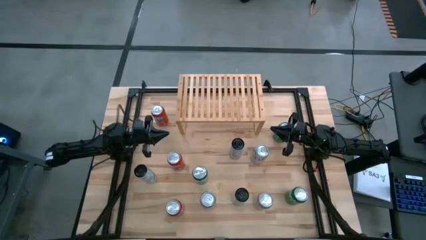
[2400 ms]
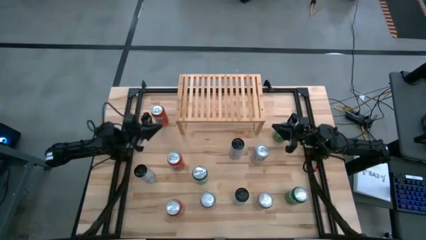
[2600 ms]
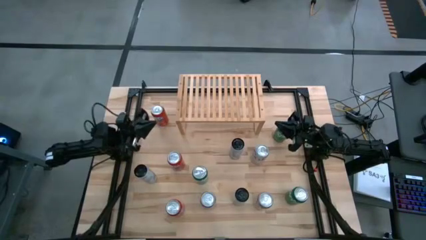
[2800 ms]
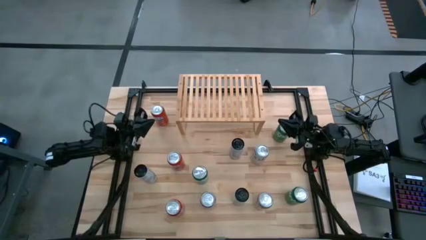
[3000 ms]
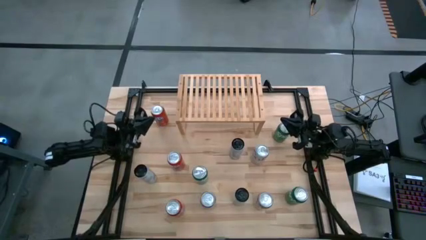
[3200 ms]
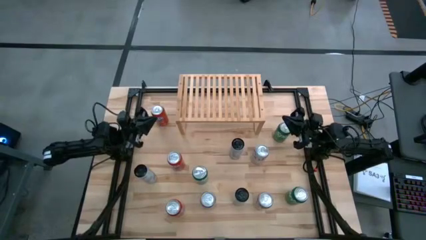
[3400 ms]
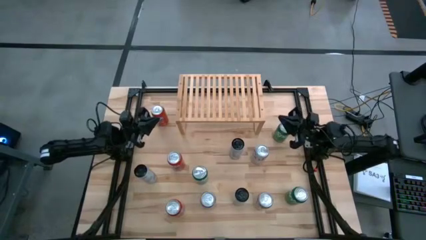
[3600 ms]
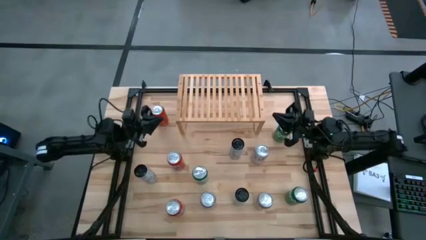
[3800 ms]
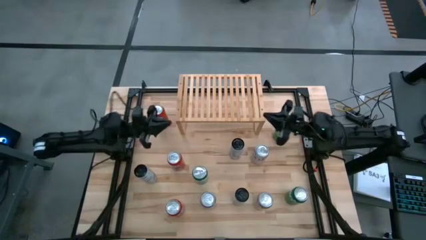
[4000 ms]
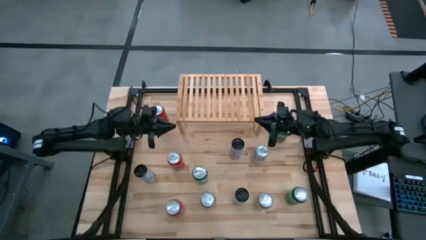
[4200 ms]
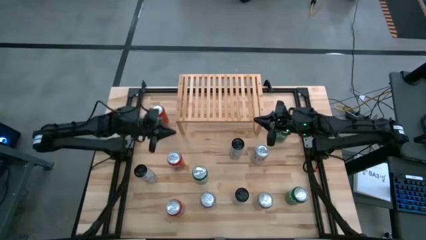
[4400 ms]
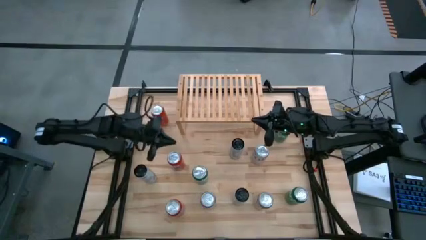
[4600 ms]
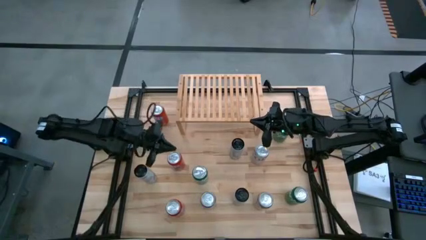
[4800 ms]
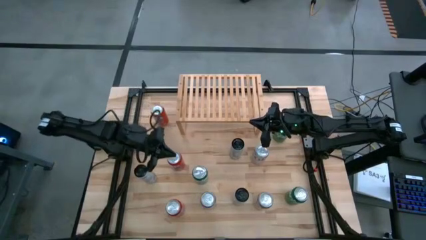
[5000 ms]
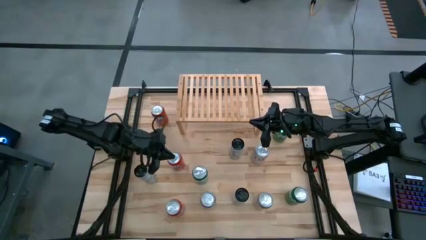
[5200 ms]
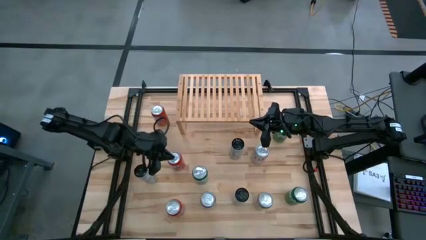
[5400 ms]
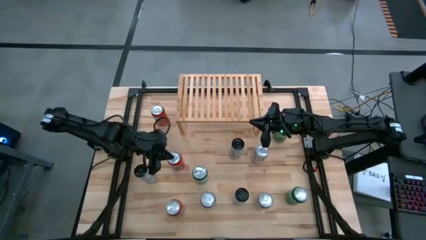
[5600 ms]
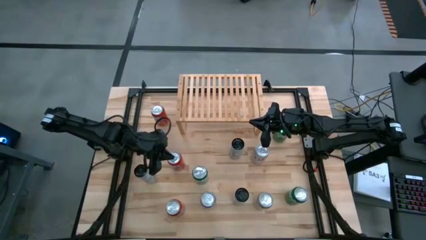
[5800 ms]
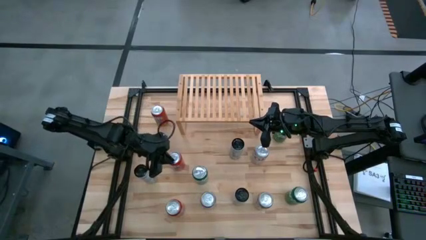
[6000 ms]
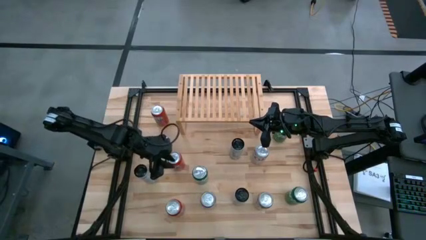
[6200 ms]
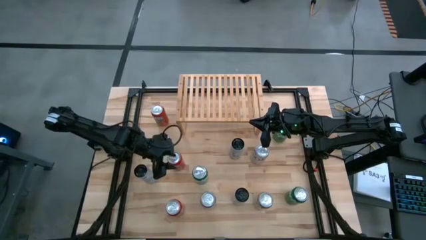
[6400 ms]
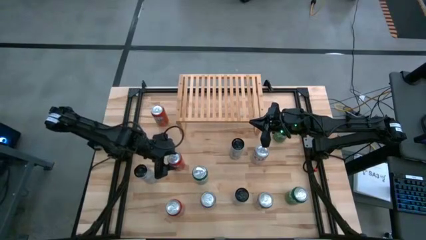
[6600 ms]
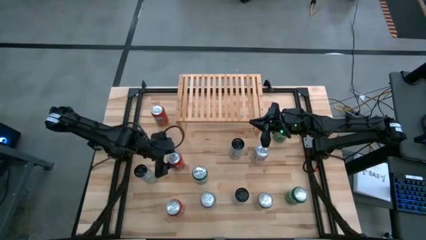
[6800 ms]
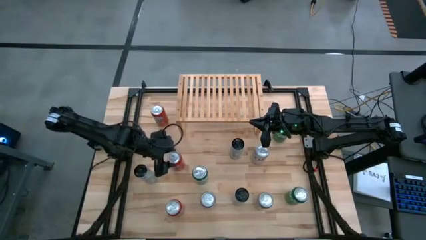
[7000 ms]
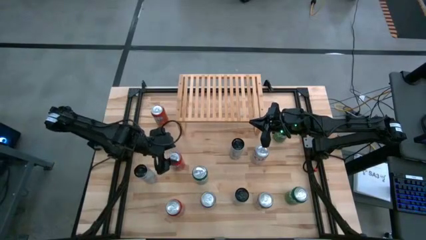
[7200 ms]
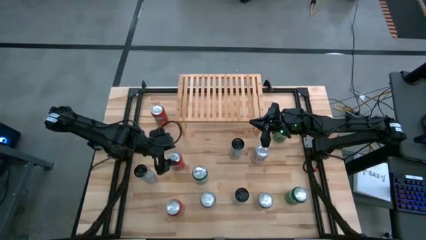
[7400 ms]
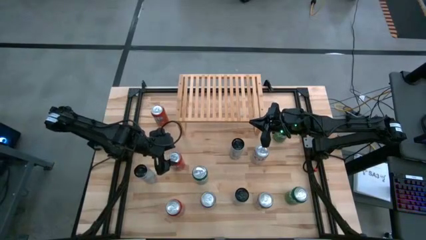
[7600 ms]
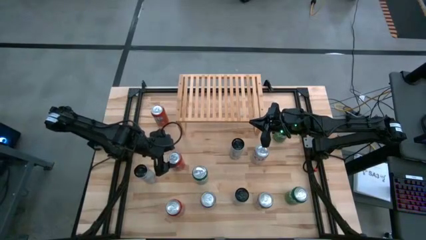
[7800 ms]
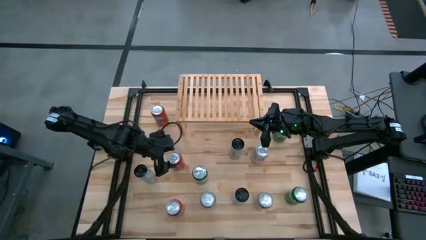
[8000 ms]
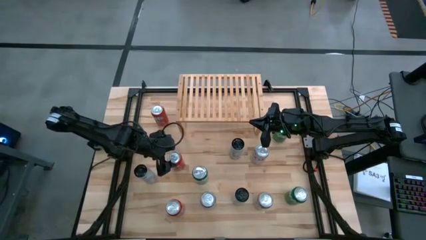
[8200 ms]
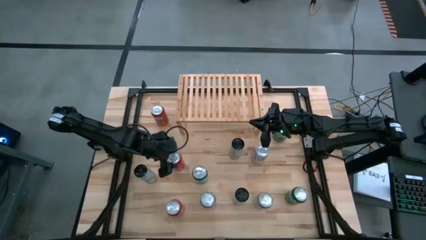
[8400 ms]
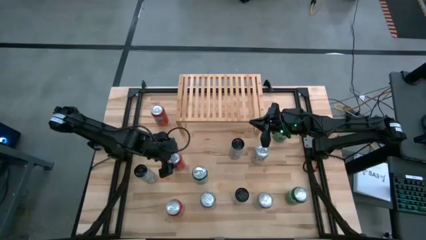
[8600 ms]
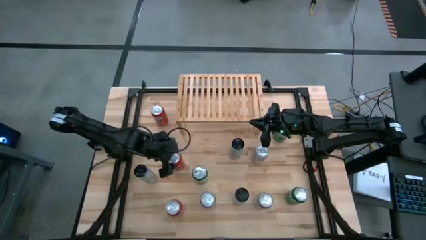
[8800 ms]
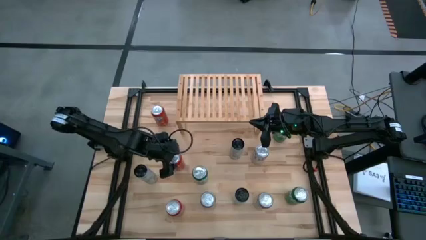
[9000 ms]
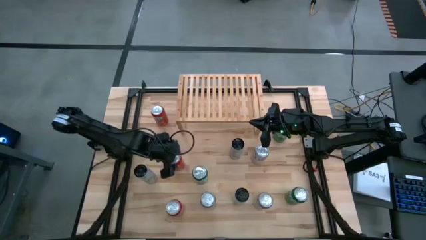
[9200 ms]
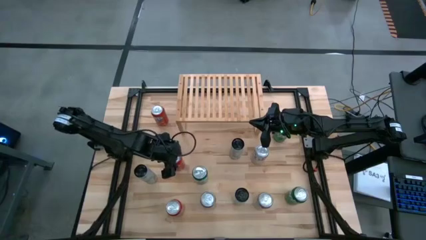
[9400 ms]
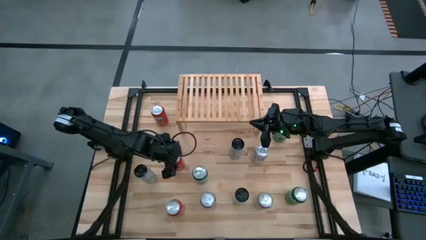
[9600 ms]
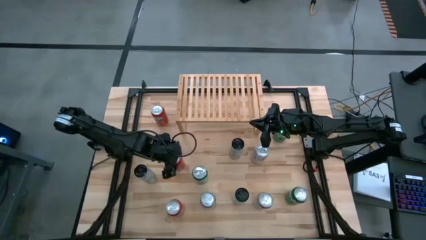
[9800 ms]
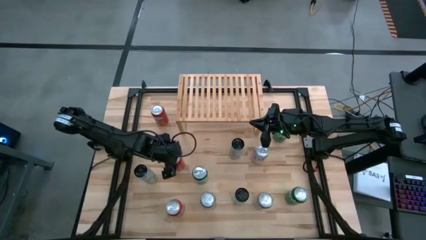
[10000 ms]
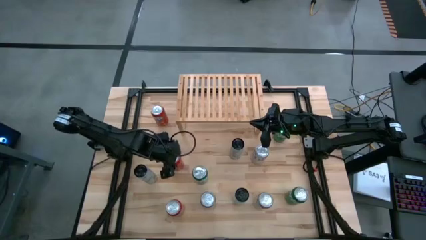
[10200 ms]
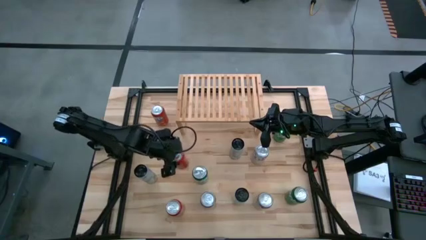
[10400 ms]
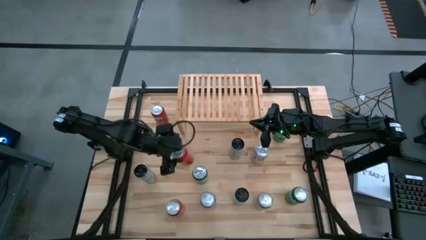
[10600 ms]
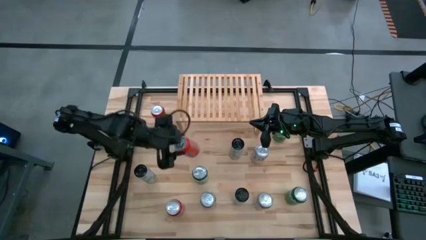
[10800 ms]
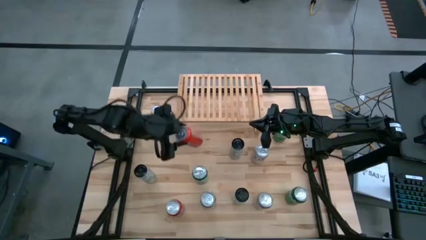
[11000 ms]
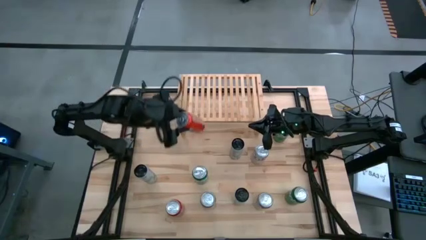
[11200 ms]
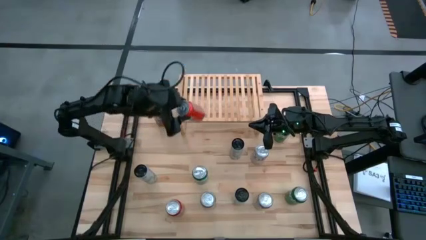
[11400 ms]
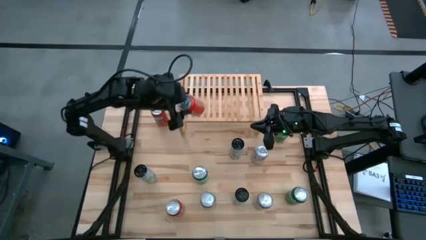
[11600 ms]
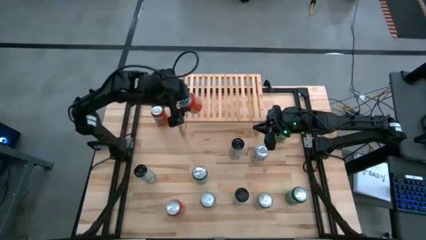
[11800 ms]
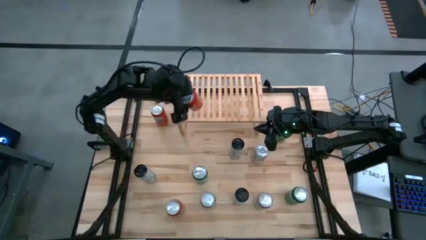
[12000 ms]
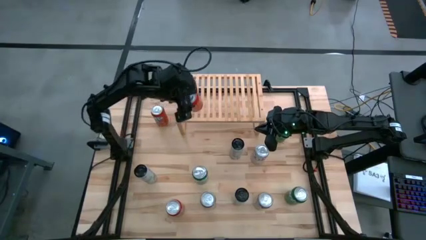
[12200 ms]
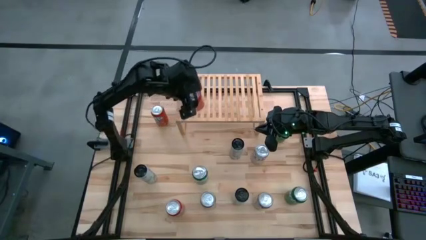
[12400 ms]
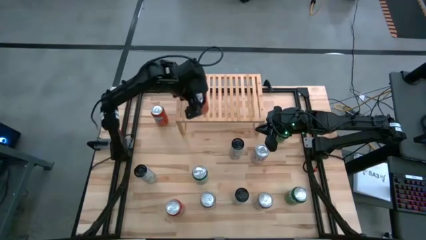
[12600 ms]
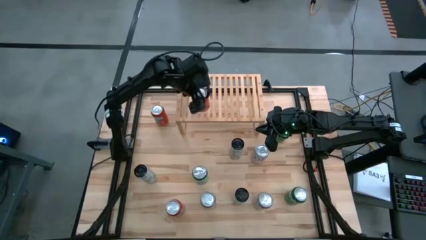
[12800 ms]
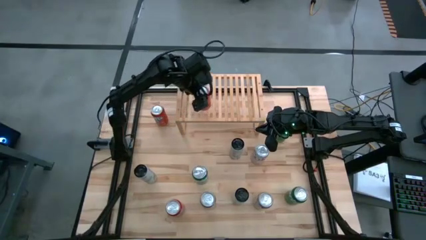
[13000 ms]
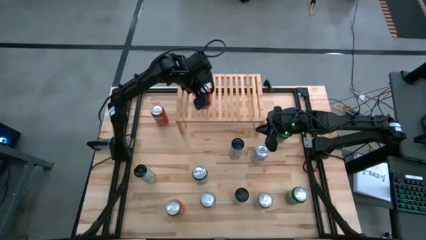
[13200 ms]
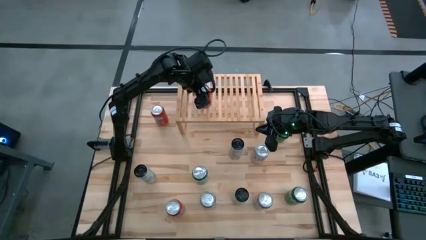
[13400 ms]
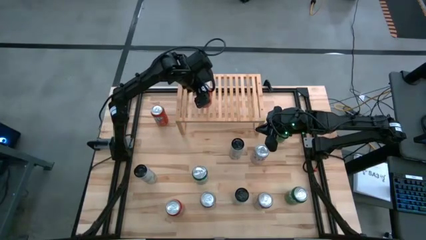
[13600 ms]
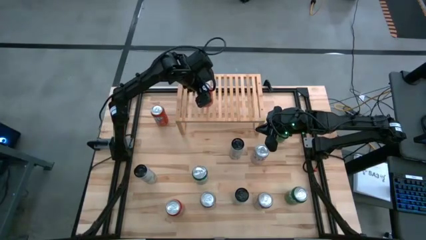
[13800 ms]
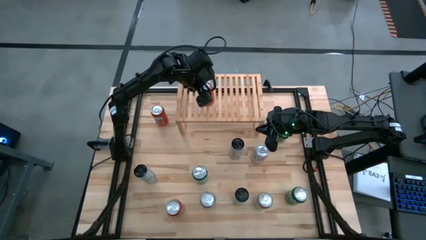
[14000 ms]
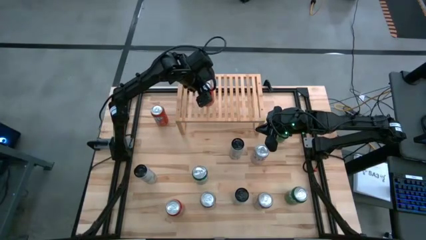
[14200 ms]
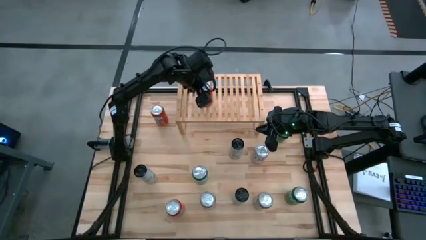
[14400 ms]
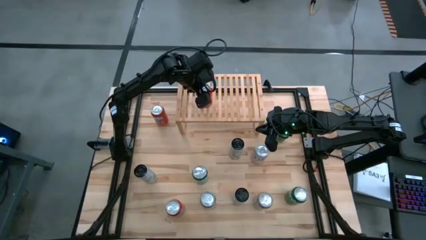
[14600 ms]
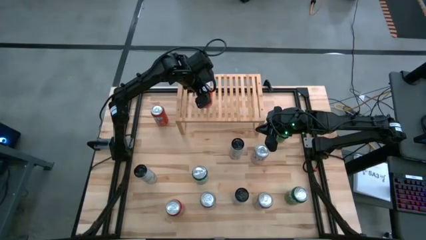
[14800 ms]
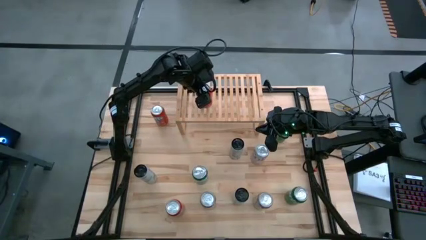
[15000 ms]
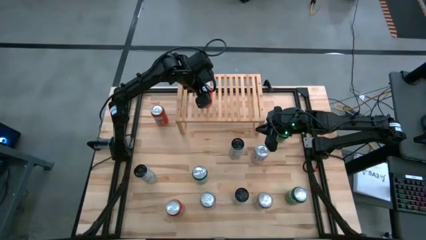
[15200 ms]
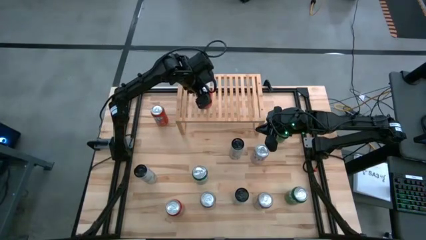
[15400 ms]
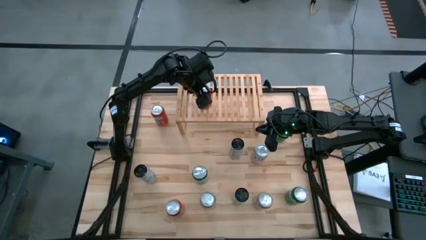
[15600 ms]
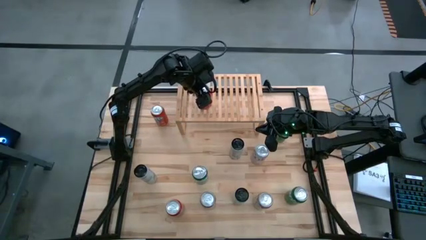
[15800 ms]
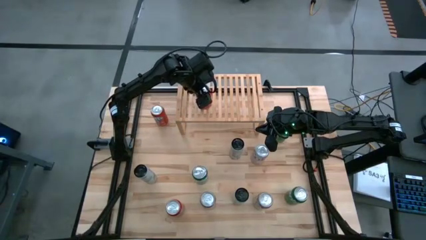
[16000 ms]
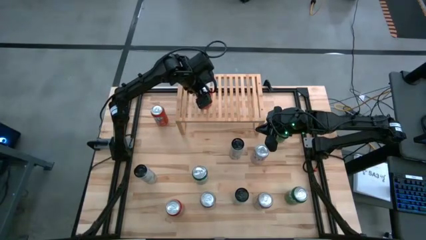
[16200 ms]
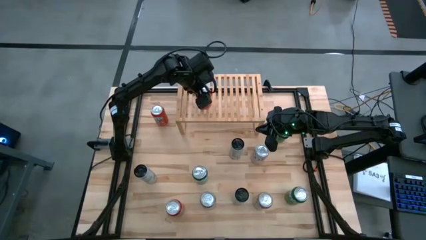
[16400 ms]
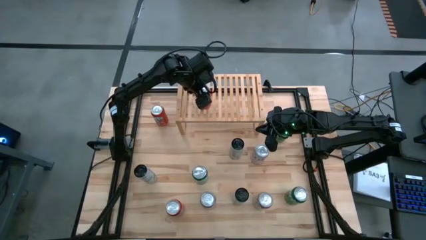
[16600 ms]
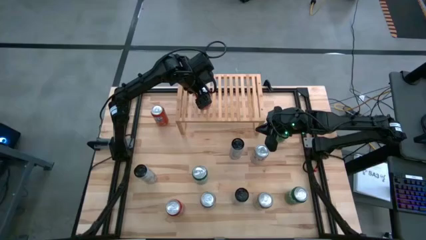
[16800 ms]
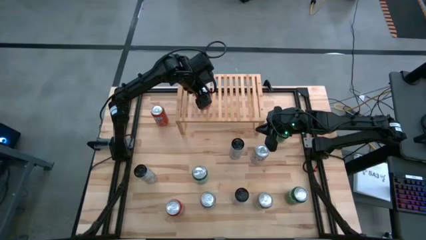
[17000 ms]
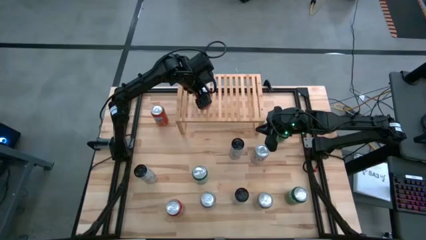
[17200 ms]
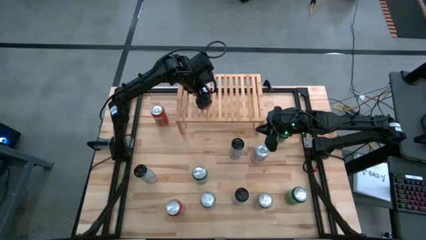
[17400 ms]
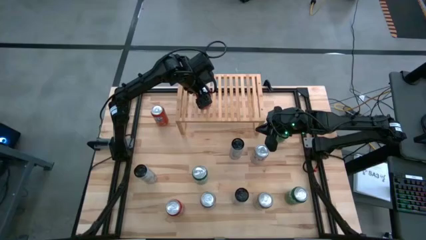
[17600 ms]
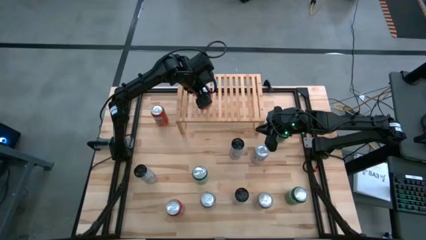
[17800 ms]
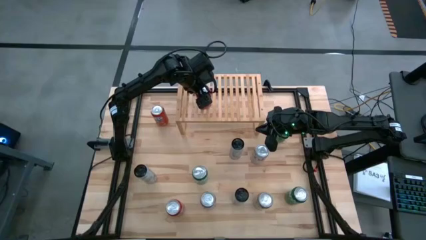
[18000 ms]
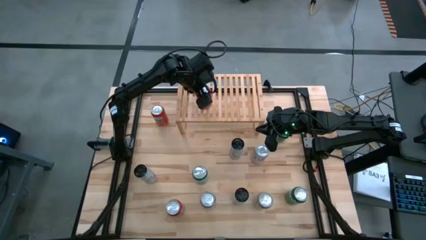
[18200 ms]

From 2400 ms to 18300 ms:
Task: Place canned beverage on shelf
Put the middle red soda can on the shelf
